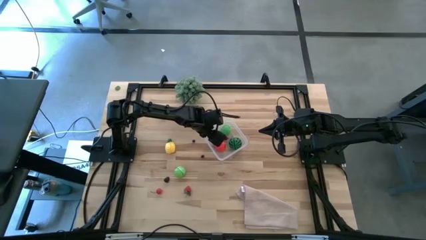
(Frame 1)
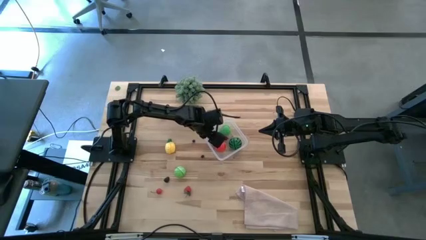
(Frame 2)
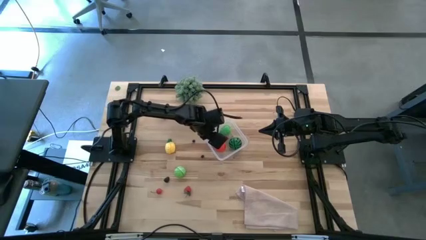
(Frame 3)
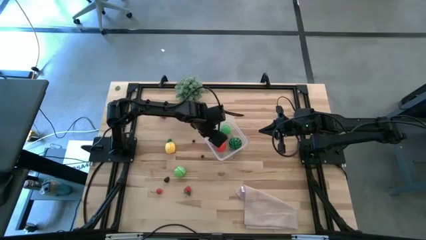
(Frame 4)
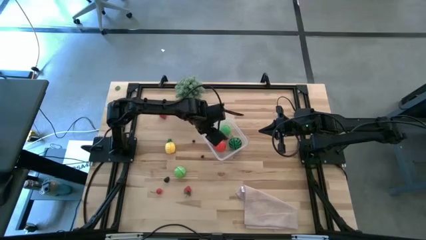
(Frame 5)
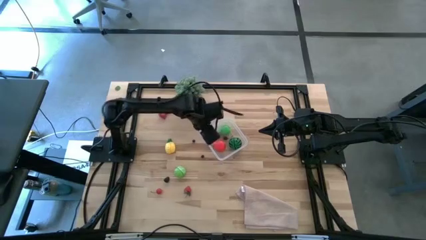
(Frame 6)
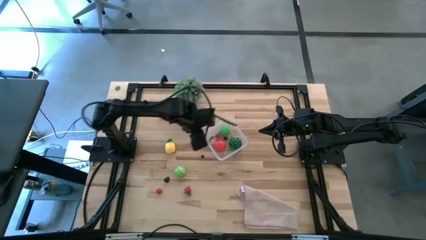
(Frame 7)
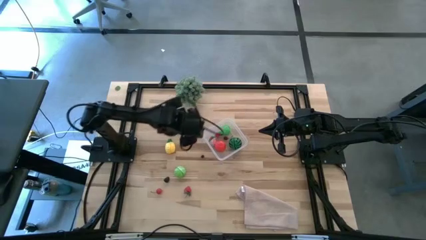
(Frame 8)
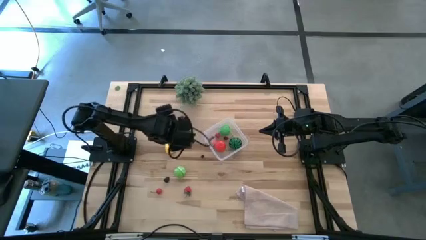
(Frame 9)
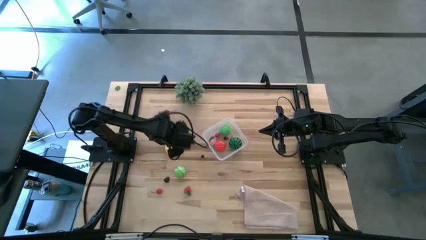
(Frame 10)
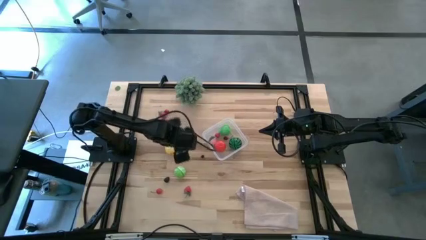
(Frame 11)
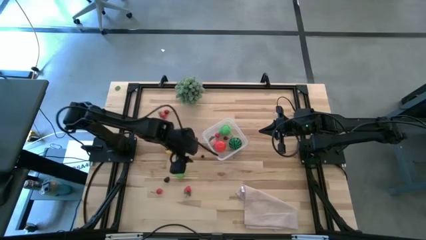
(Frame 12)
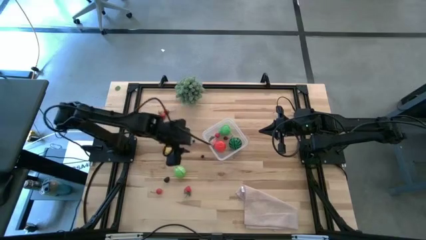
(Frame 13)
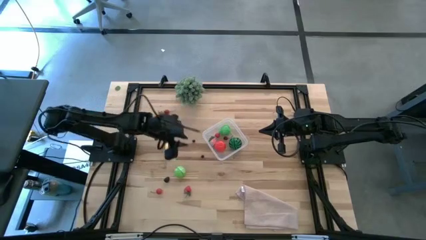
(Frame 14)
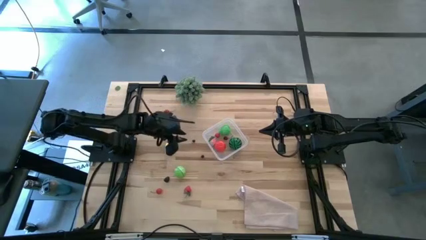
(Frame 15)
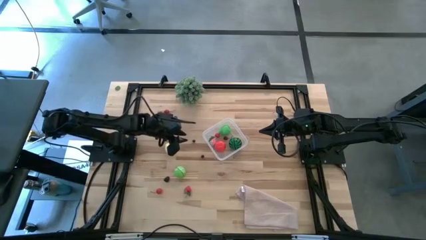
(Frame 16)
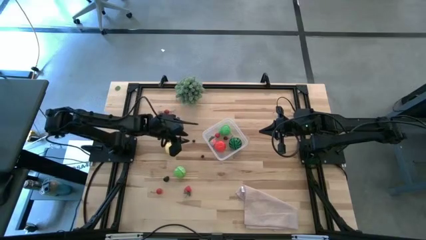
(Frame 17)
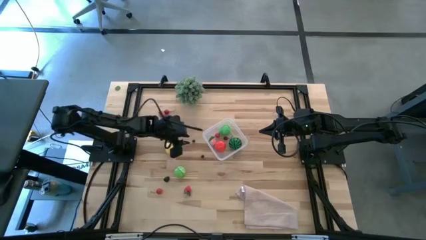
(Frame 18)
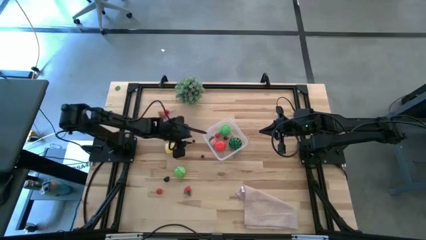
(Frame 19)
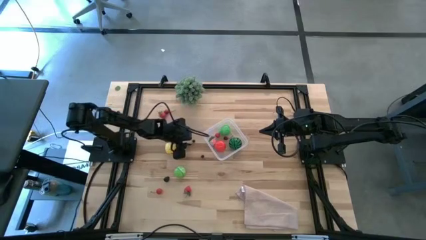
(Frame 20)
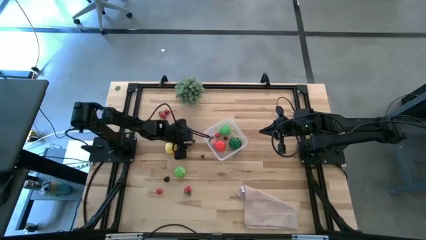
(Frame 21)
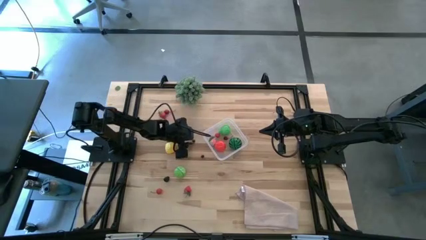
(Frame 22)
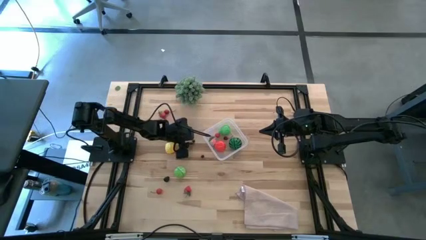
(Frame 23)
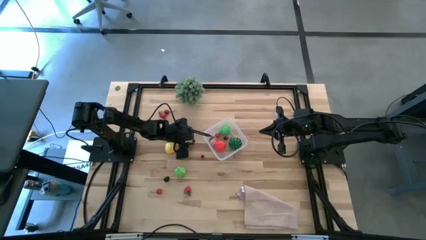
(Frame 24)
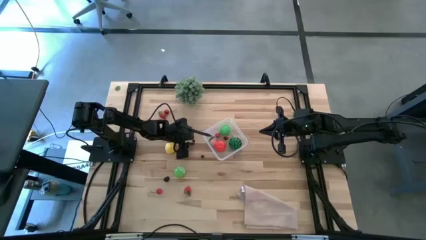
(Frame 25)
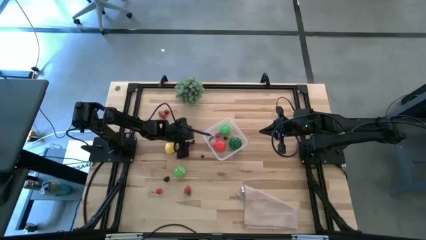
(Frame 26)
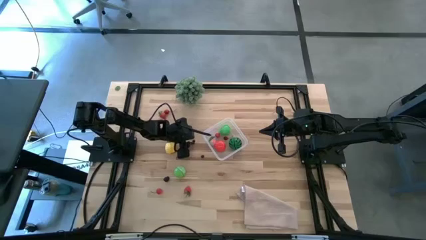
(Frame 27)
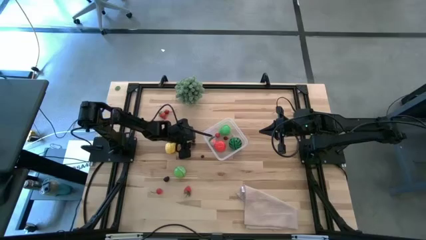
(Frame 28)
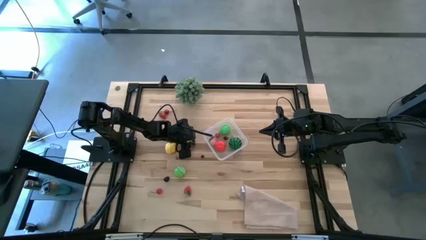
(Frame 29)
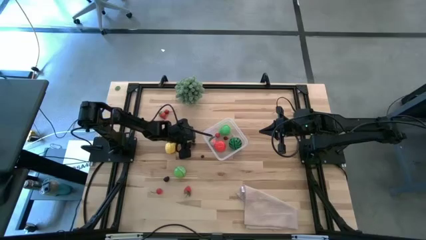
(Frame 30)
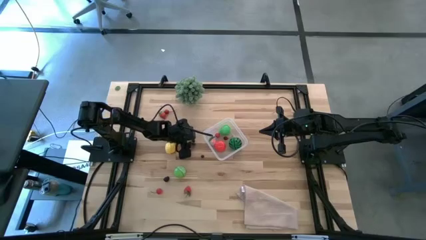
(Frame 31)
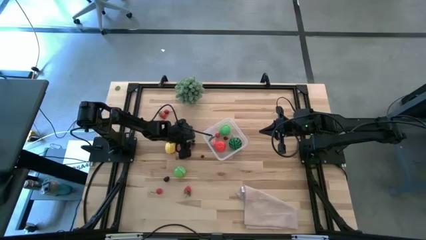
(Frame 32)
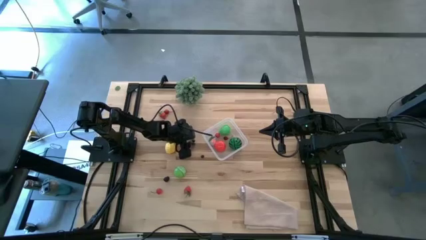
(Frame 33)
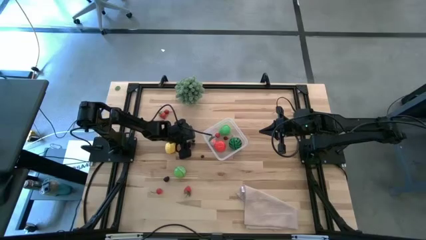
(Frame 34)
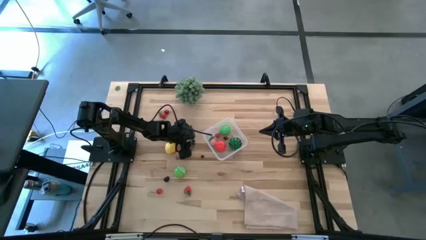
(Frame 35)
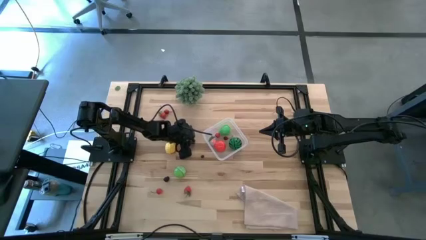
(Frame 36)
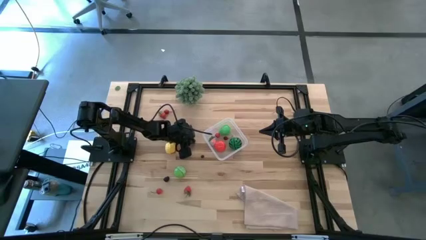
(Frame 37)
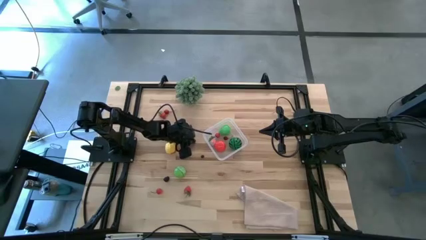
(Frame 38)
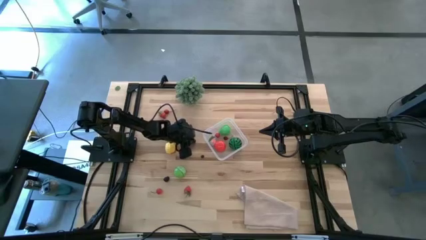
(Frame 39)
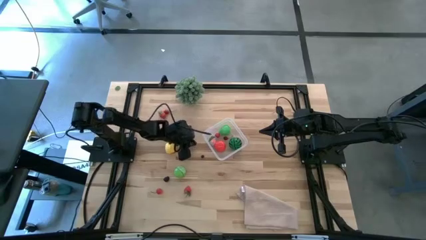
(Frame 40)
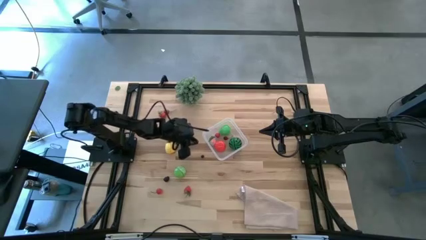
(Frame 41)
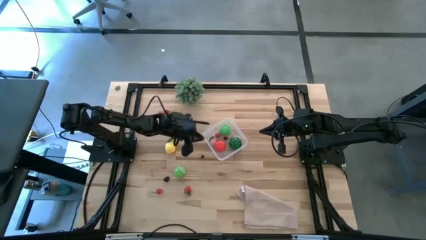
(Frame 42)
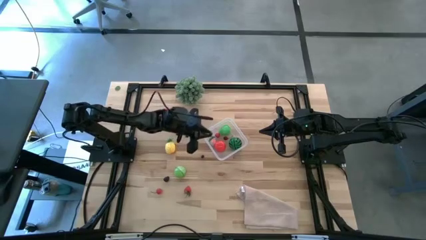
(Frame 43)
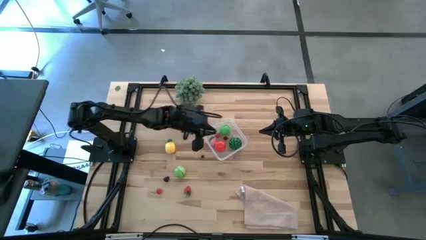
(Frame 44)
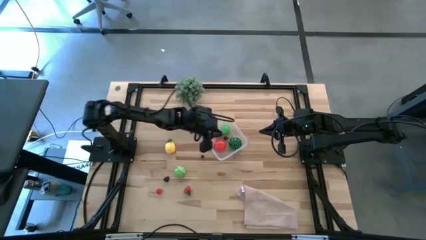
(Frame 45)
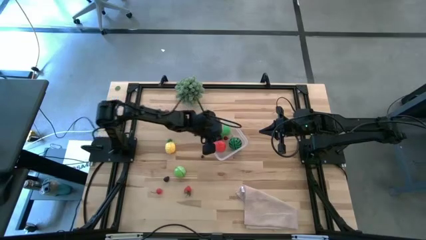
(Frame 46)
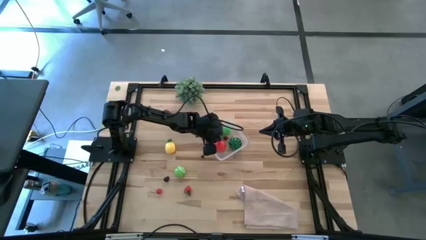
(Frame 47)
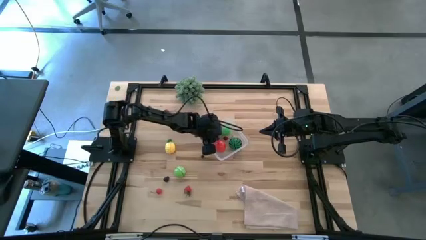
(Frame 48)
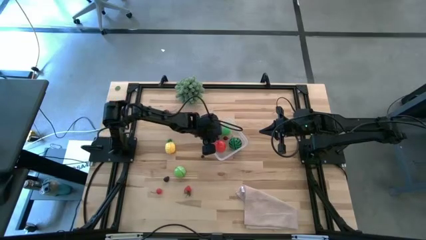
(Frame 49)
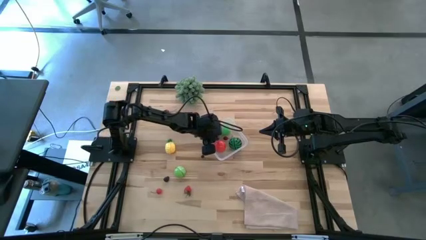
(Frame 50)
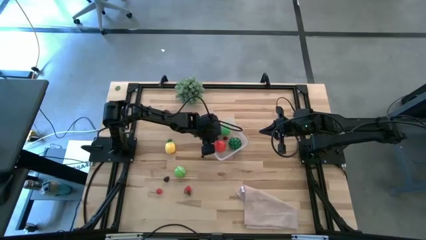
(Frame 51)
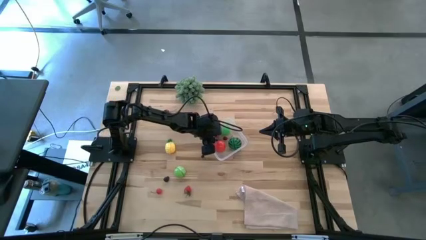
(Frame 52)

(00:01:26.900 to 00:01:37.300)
Task: Pick and placing Produce into tupperware
Put the blueberry into the transparent bin

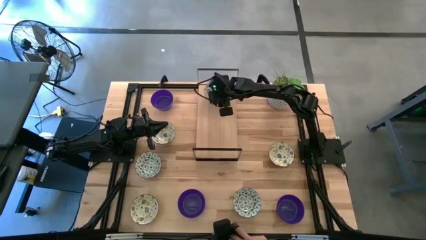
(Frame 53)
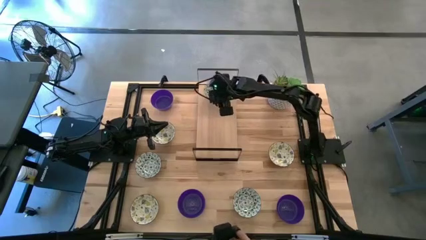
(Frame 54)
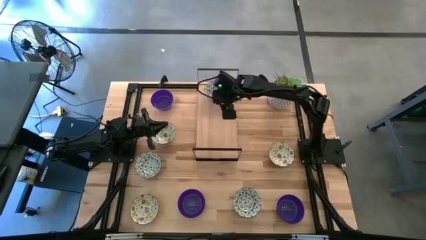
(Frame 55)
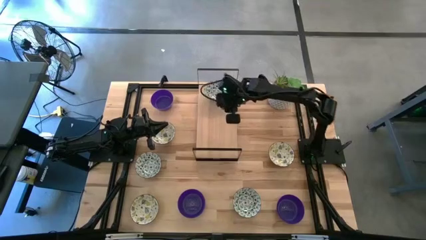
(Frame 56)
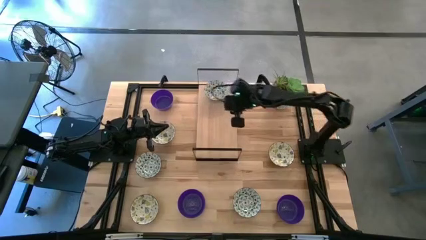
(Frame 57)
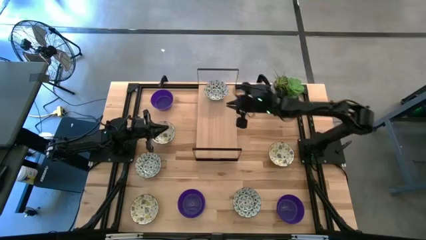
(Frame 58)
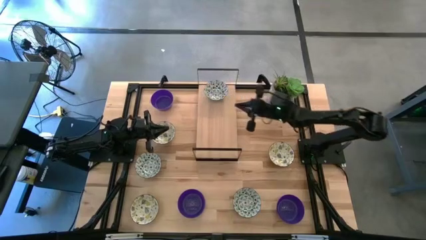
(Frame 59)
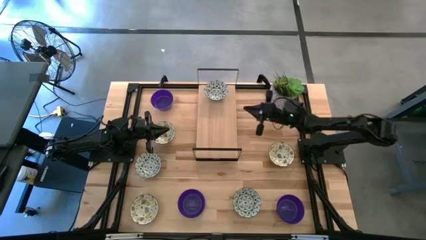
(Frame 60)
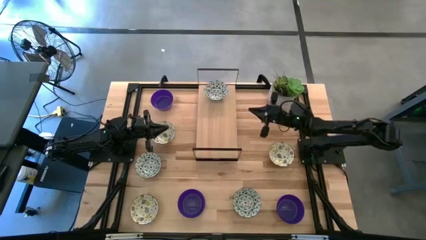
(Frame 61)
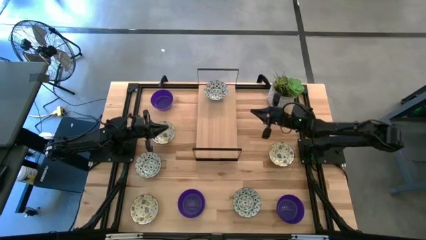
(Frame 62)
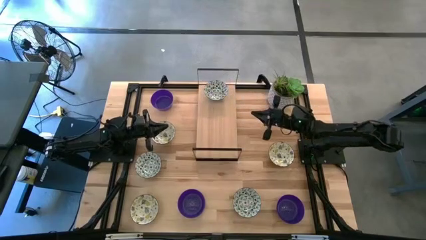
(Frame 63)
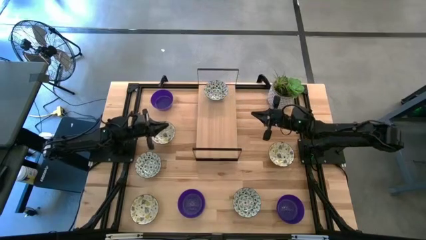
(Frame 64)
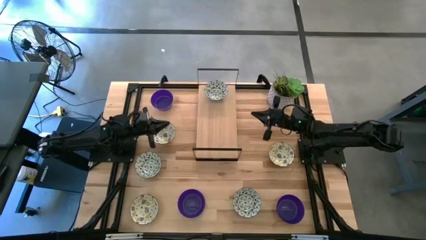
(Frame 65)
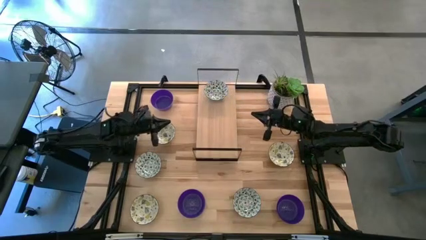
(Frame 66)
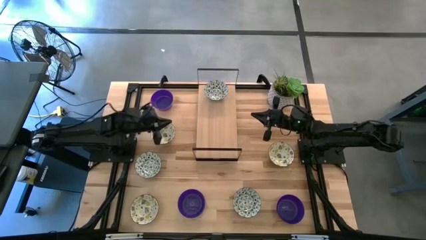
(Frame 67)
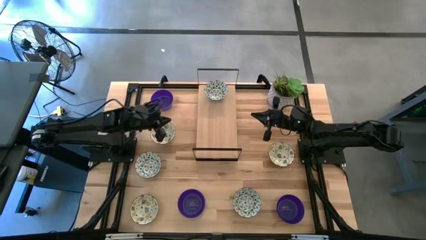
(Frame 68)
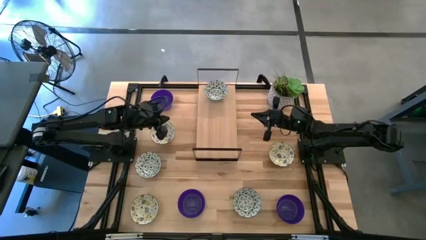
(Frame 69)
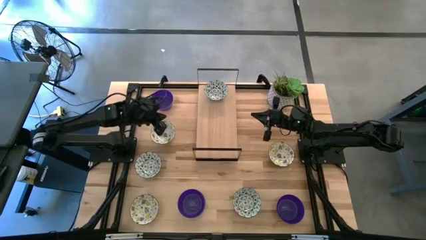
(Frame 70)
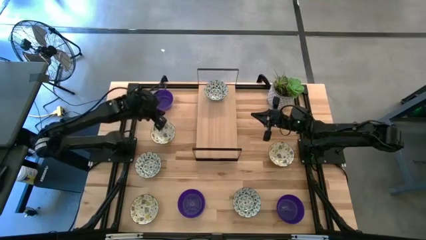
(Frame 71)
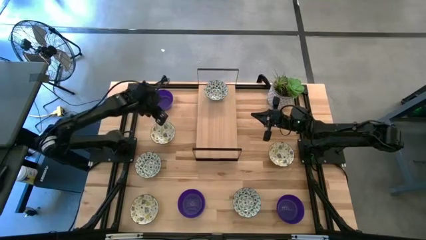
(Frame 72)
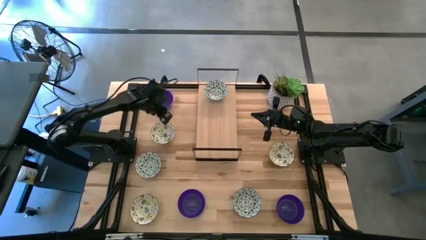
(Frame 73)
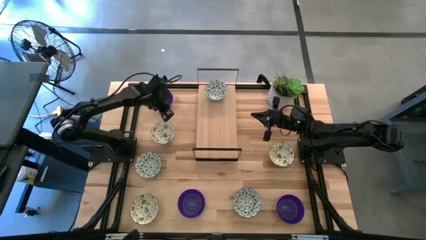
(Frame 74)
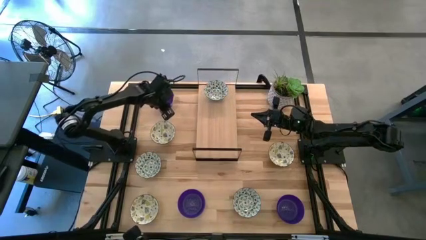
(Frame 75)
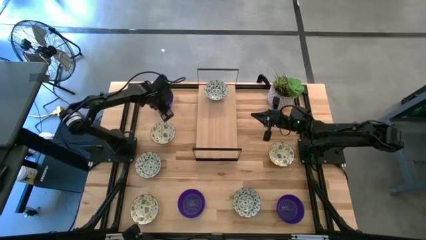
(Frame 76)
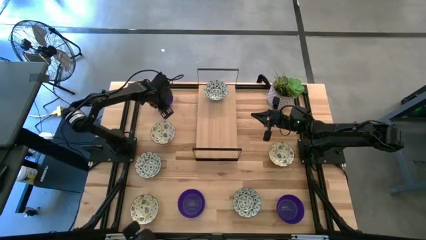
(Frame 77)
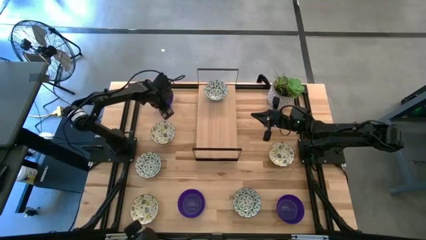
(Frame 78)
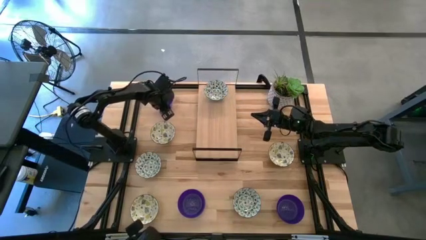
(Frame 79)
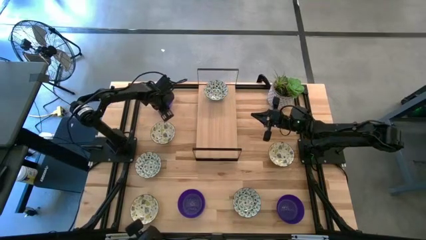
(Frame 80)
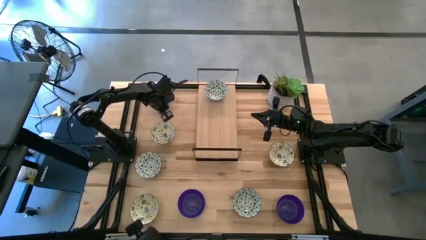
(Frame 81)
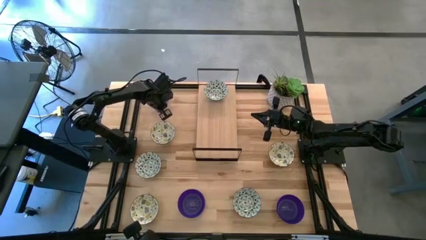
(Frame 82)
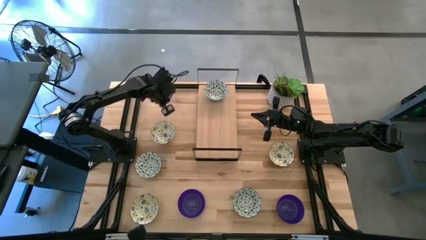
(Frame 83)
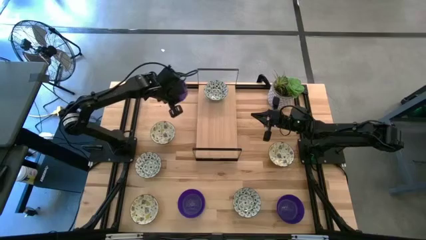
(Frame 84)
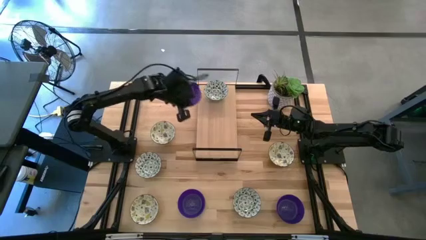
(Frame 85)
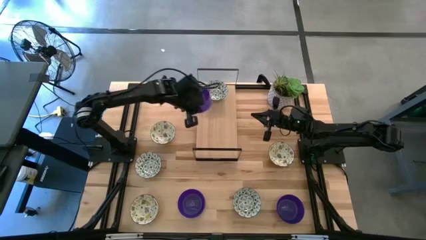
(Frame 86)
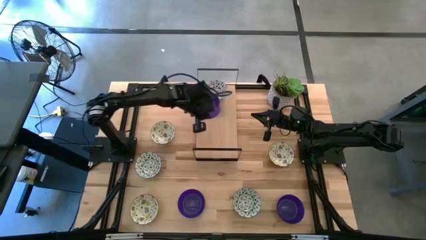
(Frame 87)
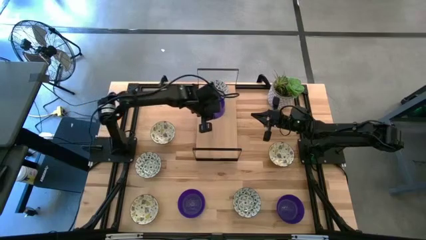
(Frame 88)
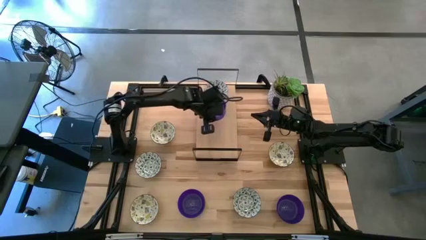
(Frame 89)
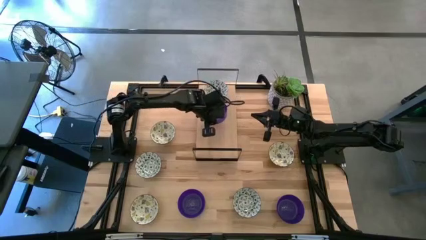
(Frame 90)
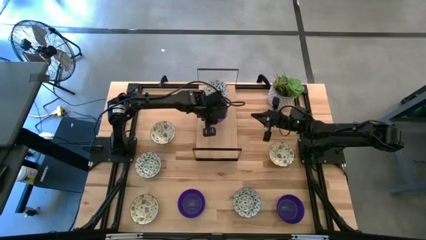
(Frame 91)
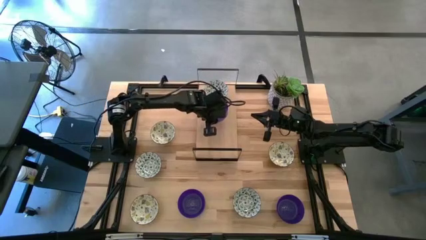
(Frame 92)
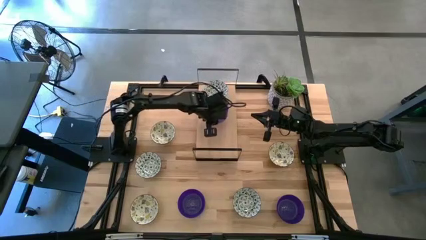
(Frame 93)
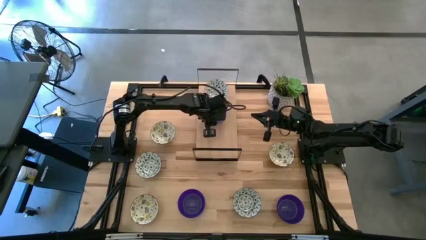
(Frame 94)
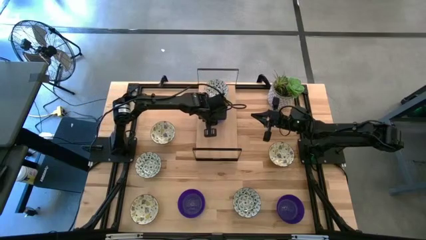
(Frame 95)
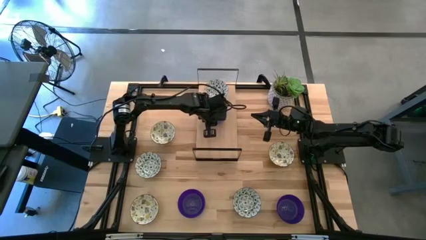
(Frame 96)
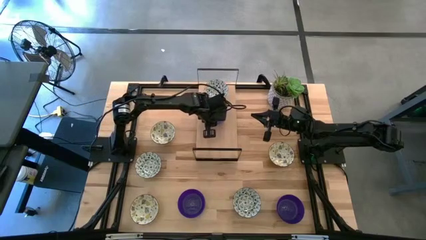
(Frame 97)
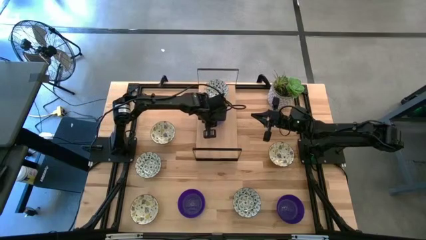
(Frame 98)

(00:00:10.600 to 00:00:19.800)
Task: Pick & Place Mini bowls
Put the top violet bowl on the shelf
